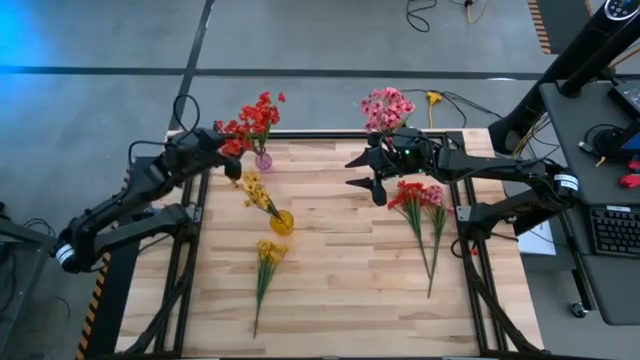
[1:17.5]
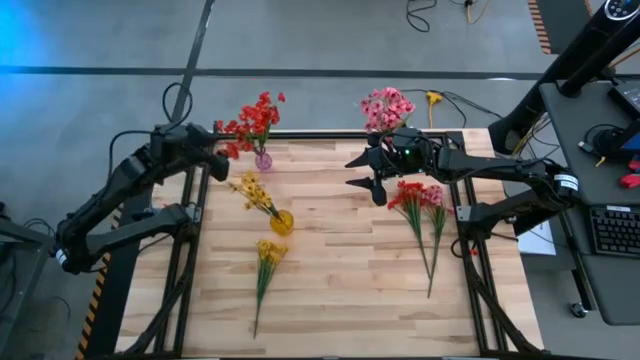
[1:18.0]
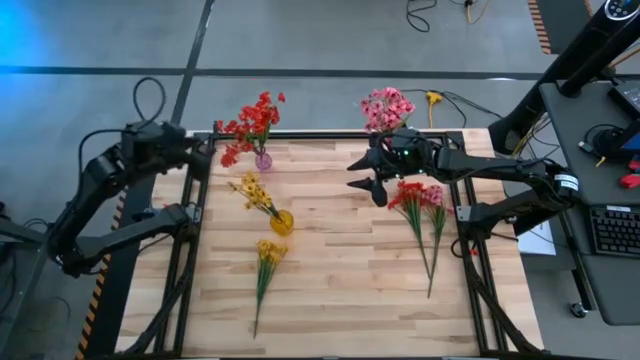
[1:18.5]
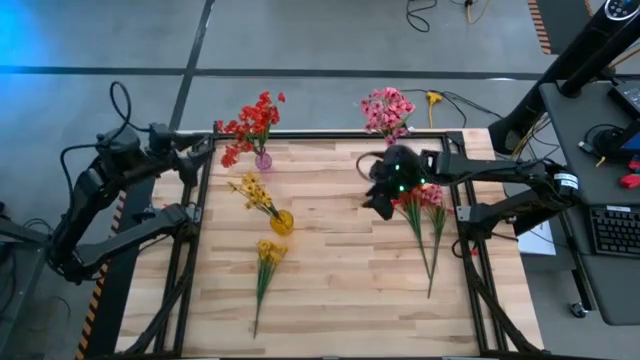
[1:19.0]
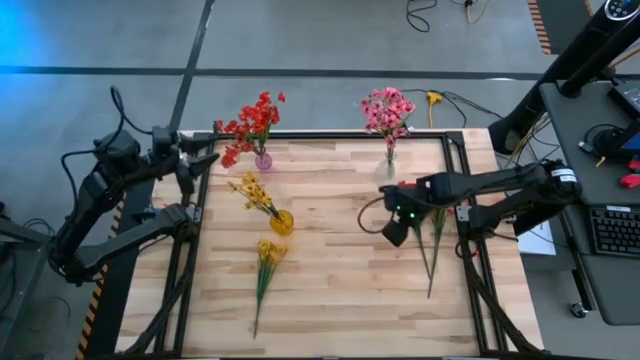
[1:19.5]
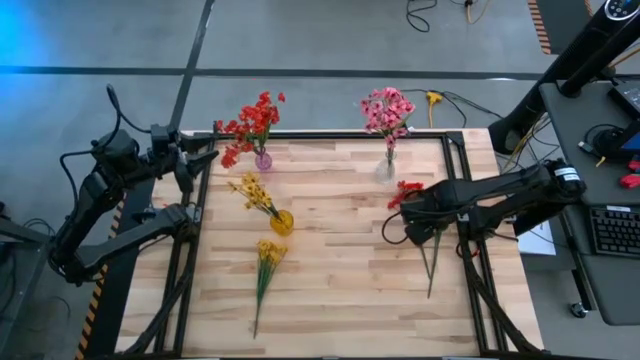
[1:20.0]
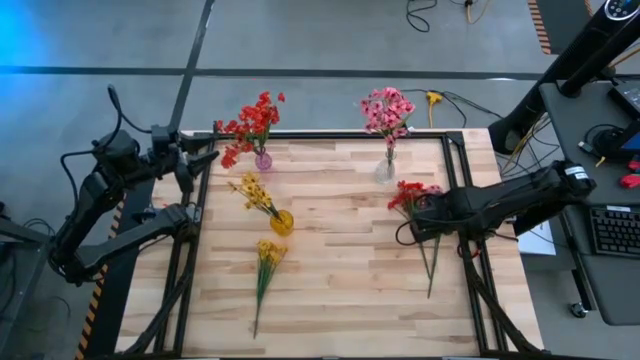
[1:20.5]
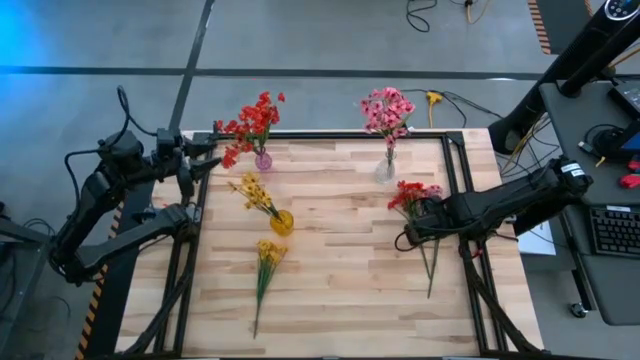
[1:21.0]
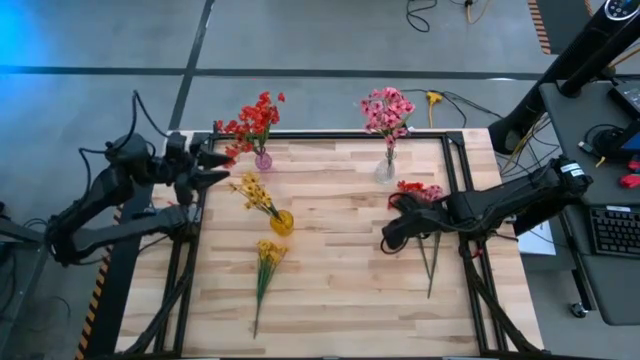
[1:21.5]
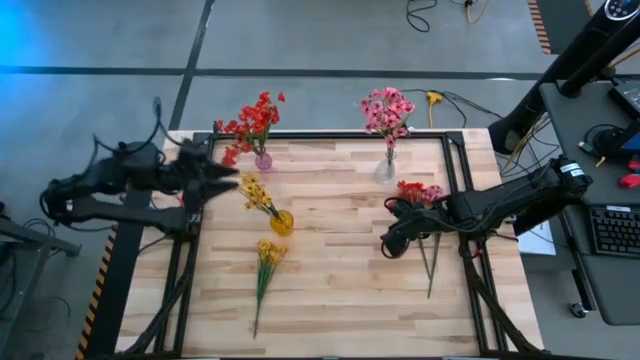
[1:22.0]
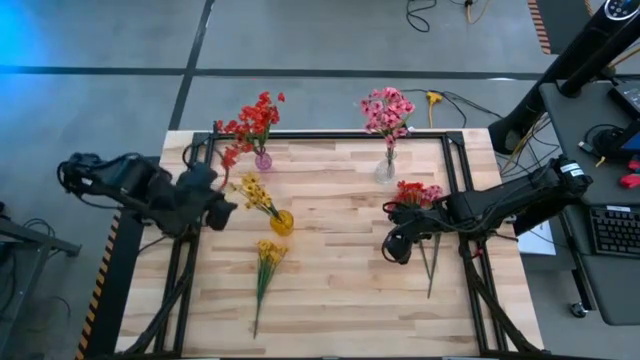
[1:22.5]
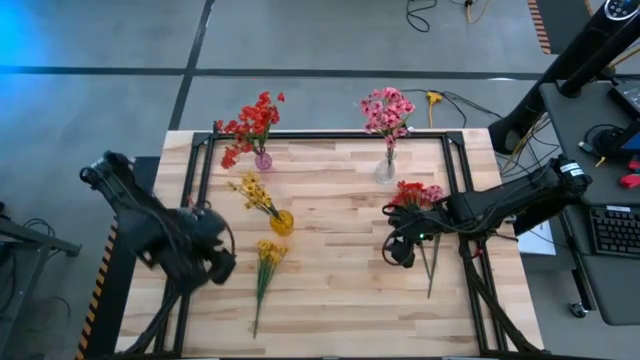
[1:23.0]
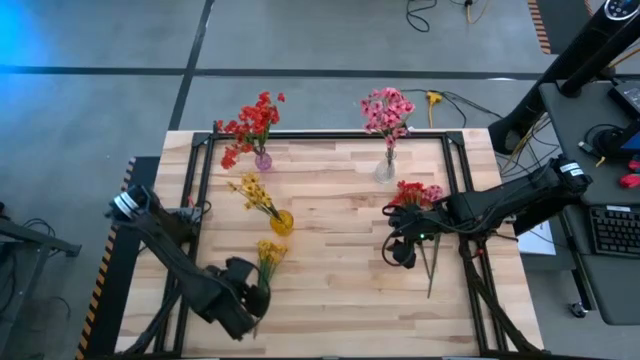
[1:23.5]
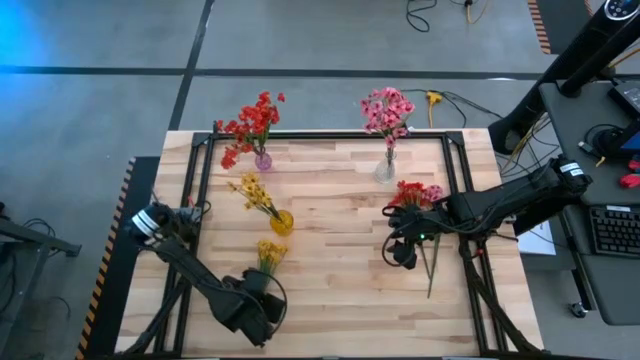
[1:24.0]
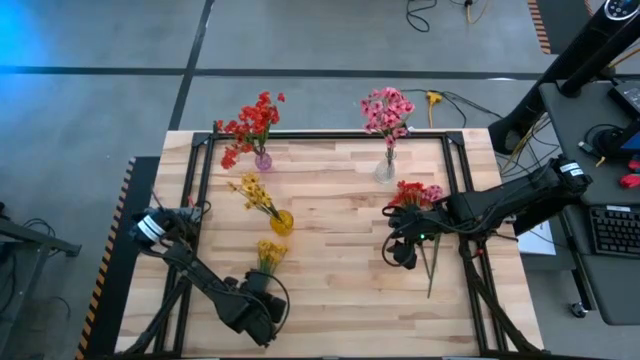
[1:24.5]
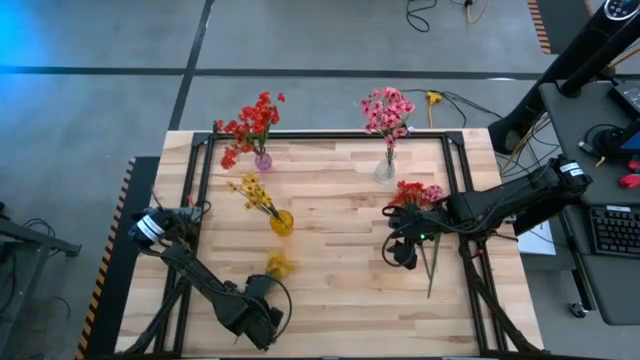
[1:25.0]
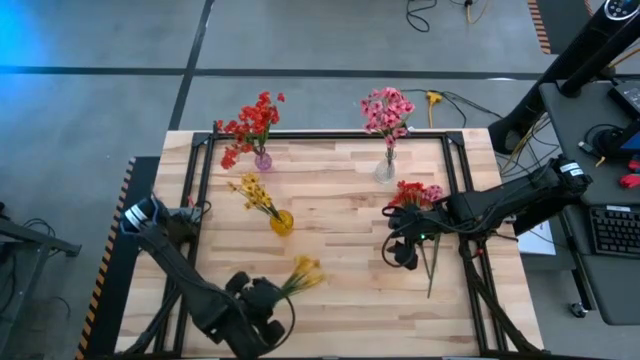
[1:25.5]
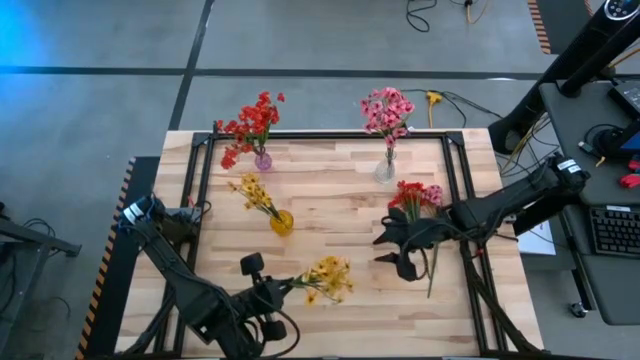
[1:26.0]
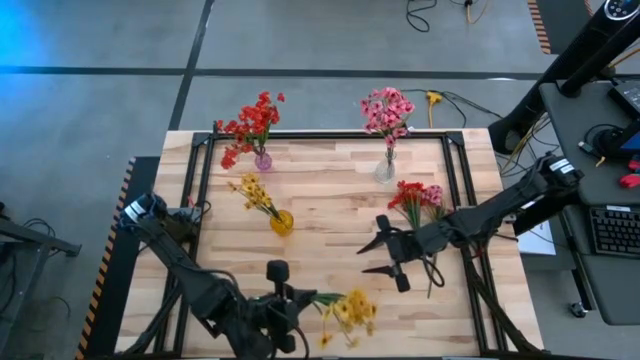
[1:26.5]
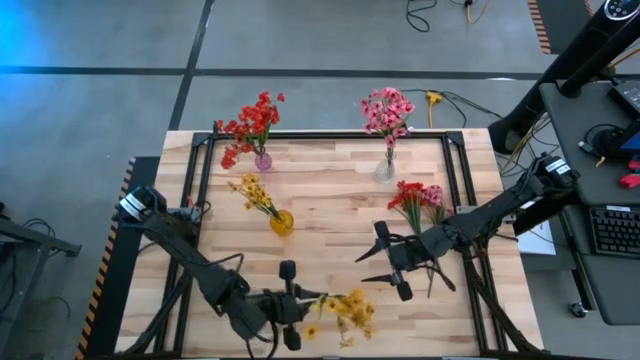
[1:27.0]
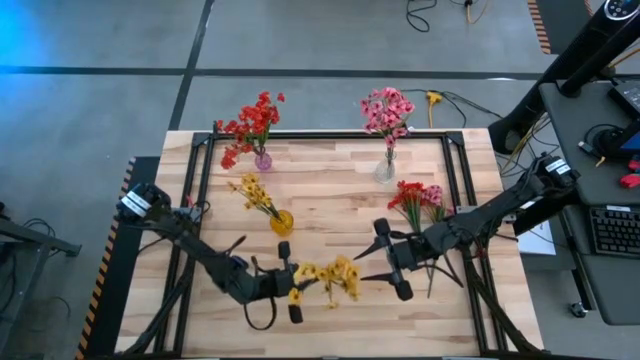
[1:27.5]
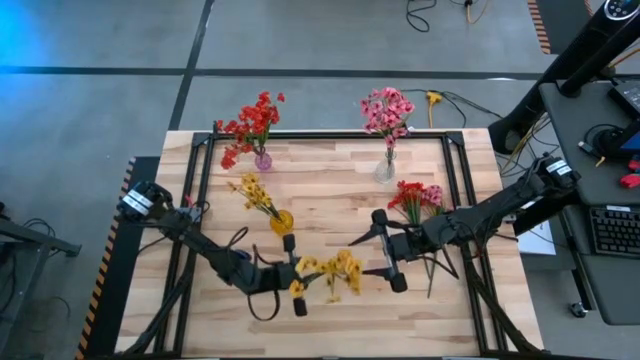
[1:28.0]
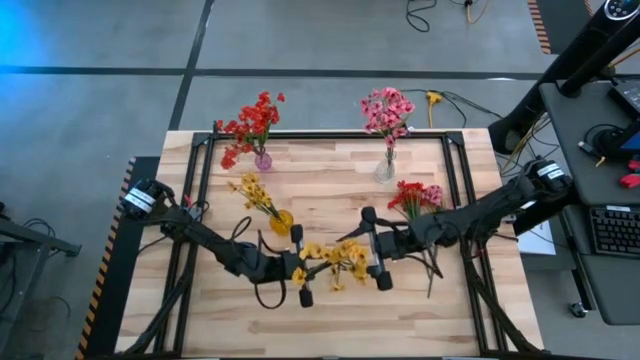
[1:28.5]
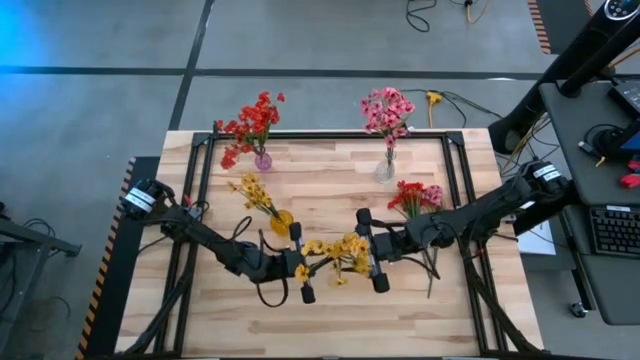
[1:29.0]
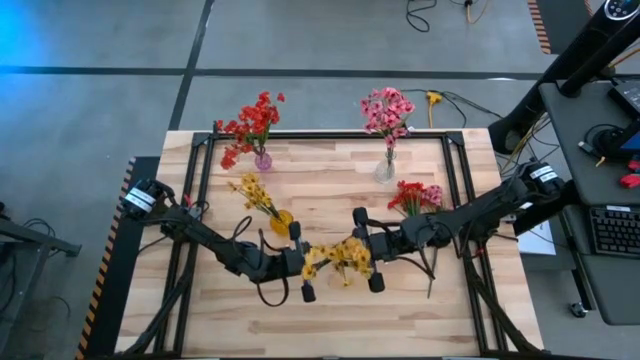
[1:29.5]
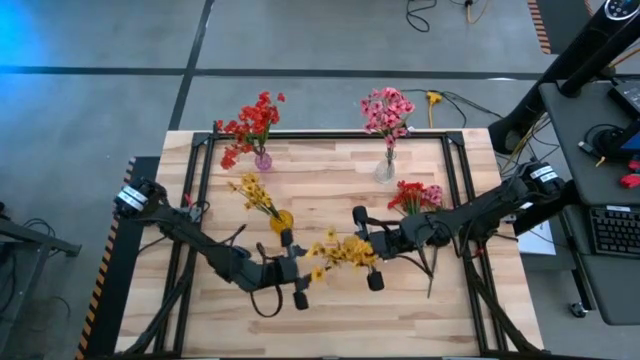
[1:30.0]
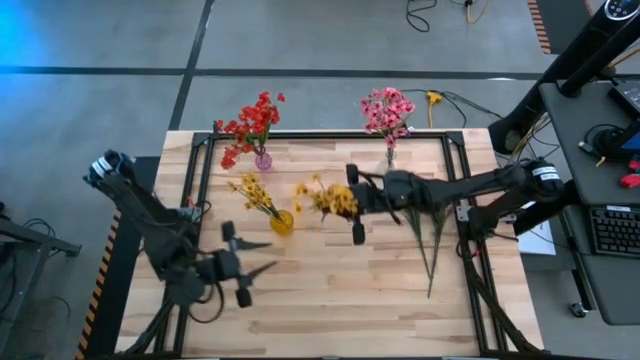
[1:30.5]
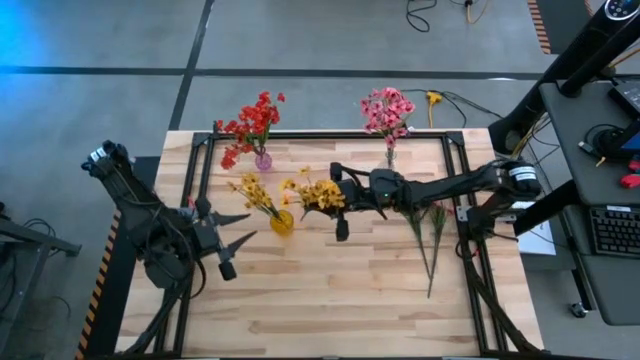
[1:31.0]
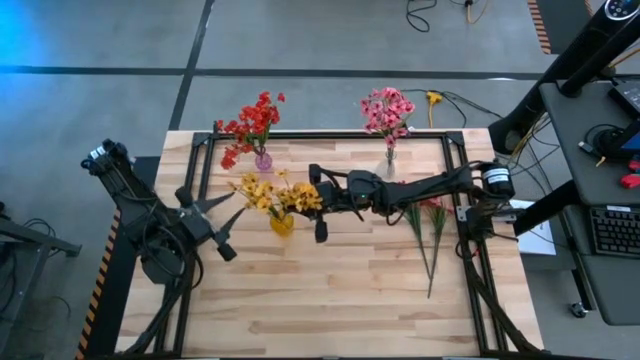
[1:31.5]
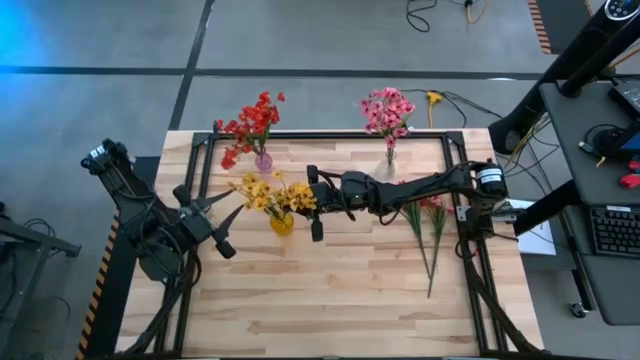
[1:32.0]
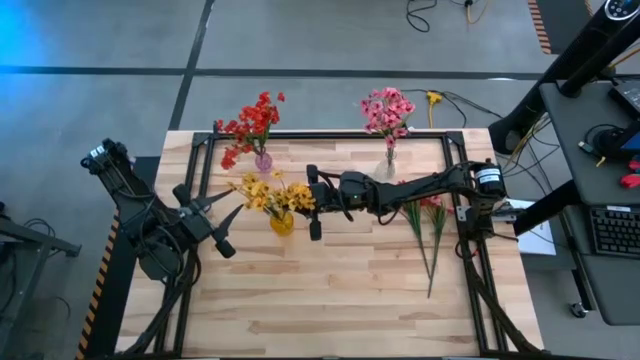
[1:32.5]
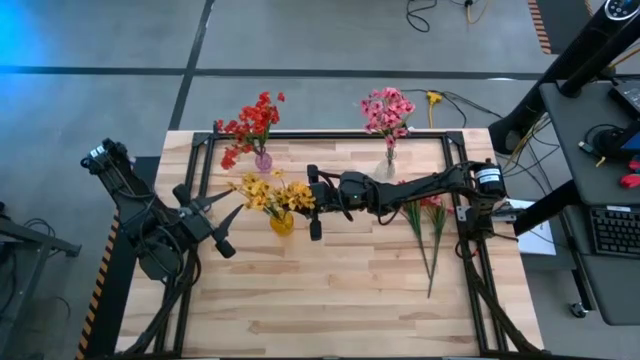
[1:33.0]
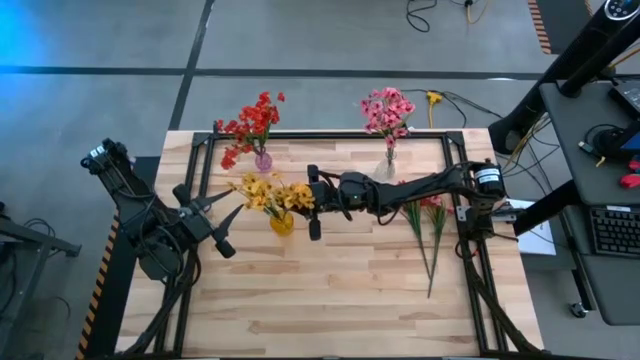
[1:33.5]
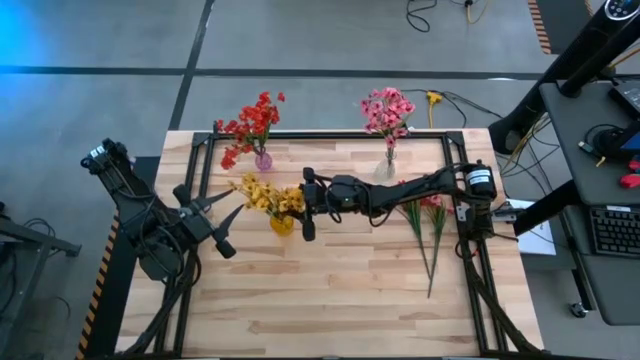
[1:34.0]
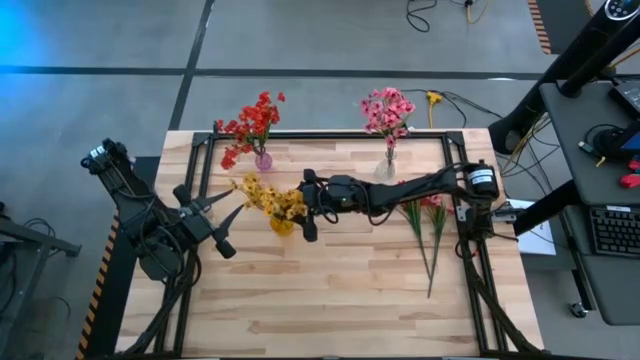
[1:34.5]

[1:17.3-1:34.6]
Task: Sort flowers into vase by color
Put the yellow flower into the yellow flower vase
